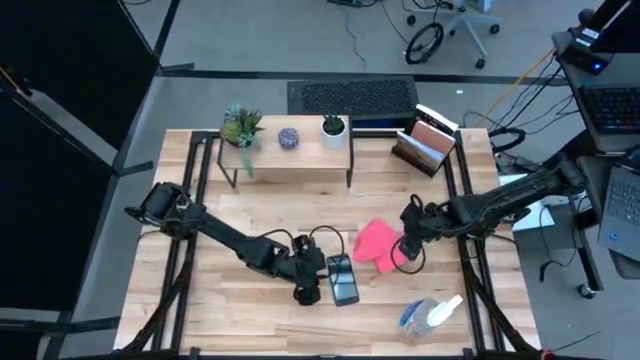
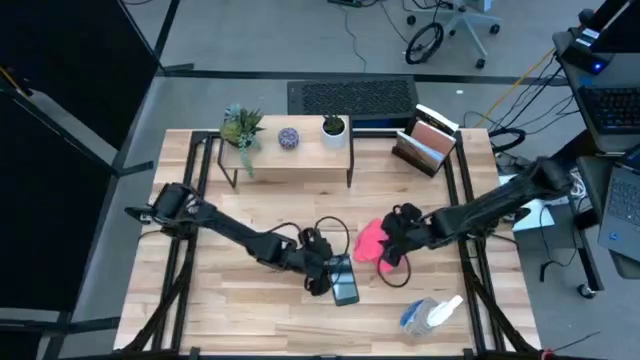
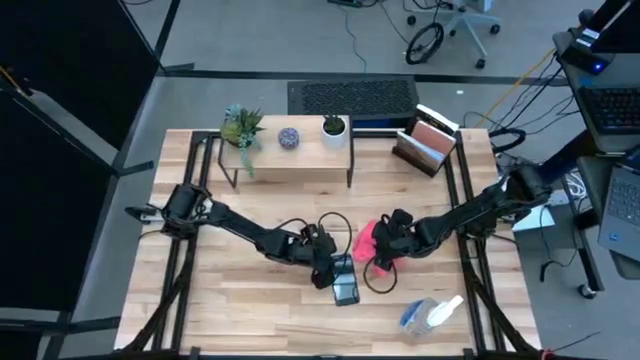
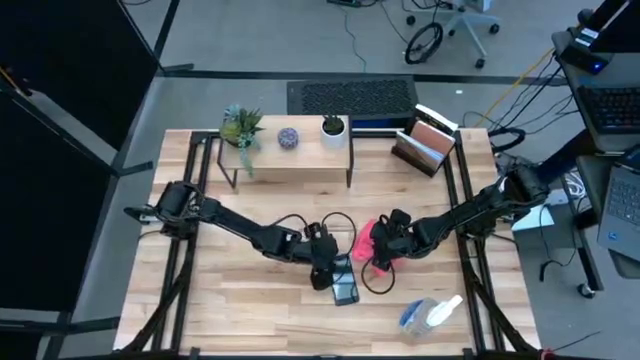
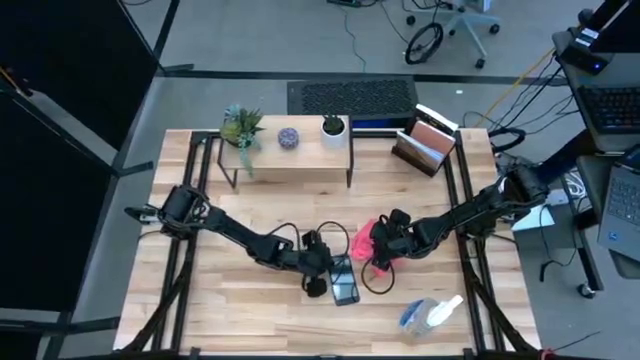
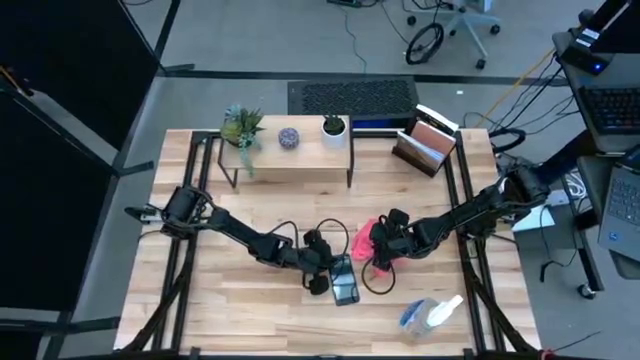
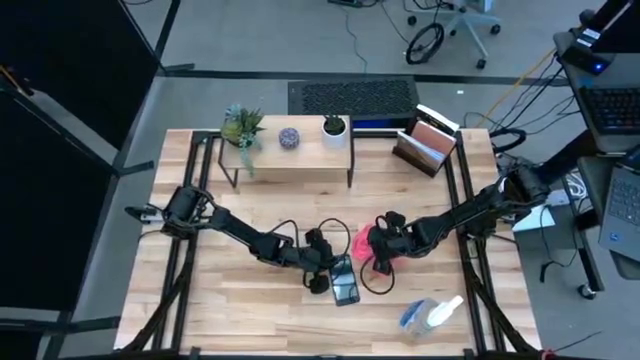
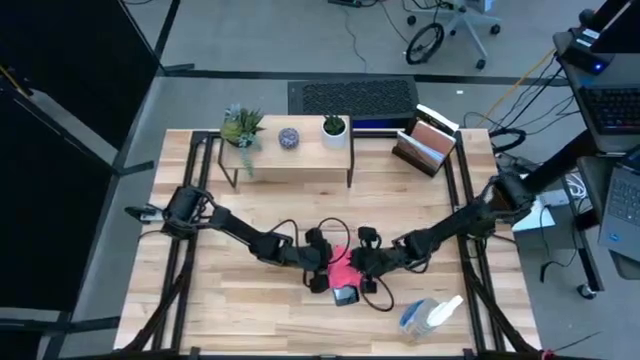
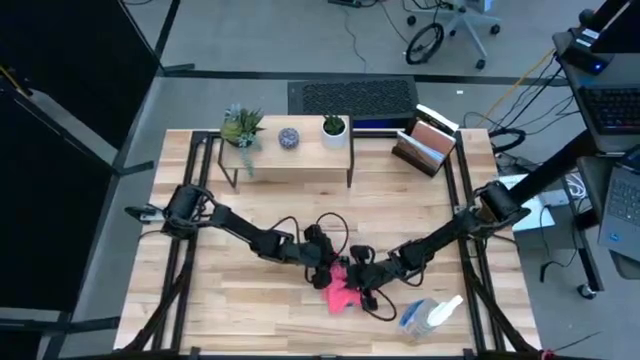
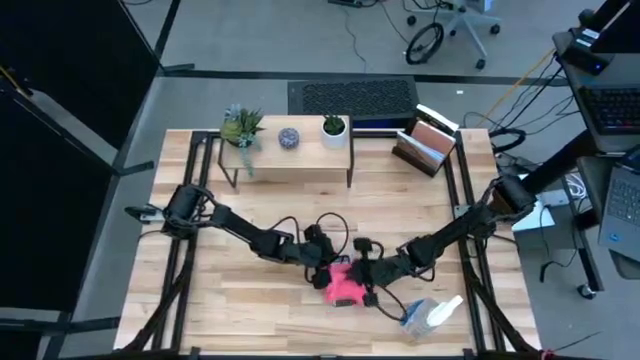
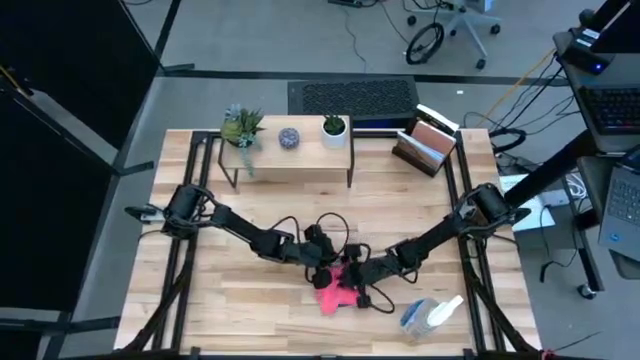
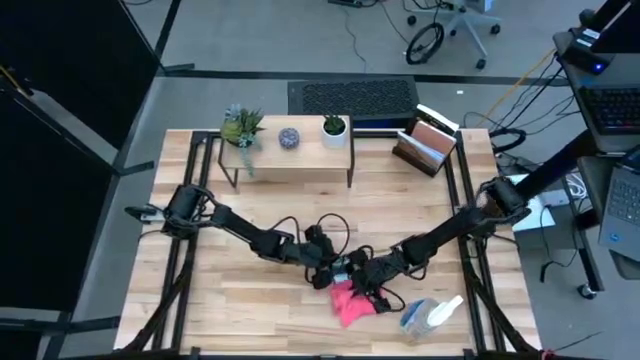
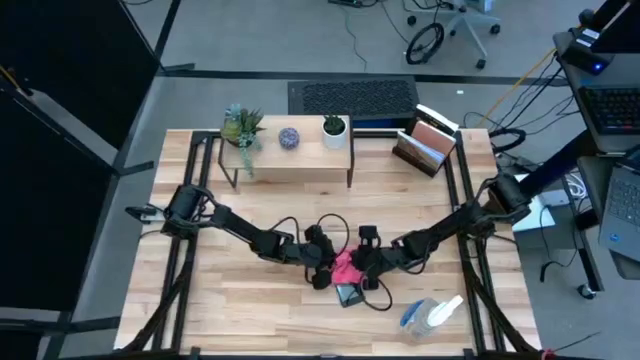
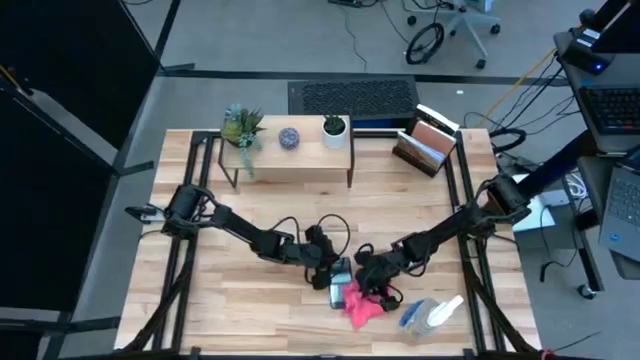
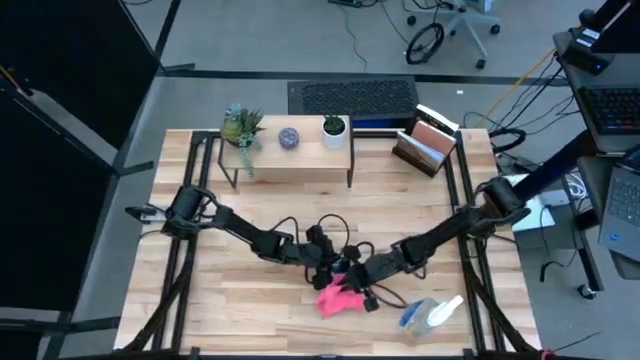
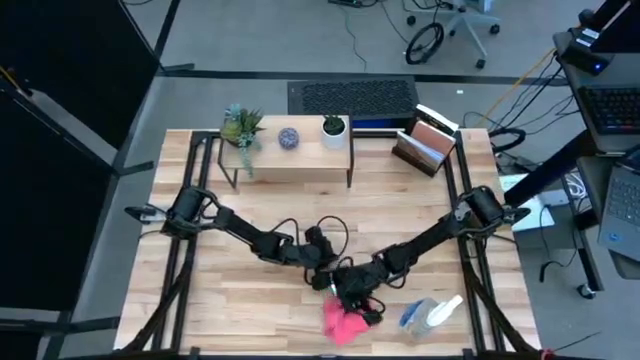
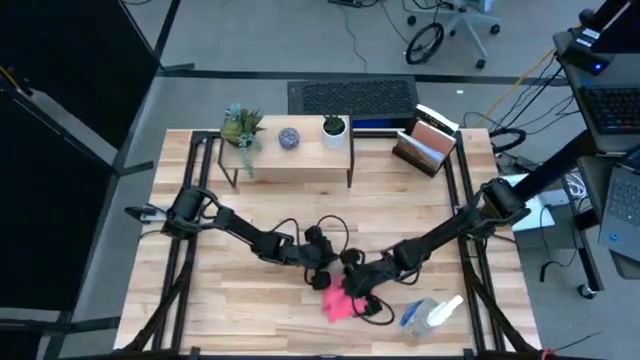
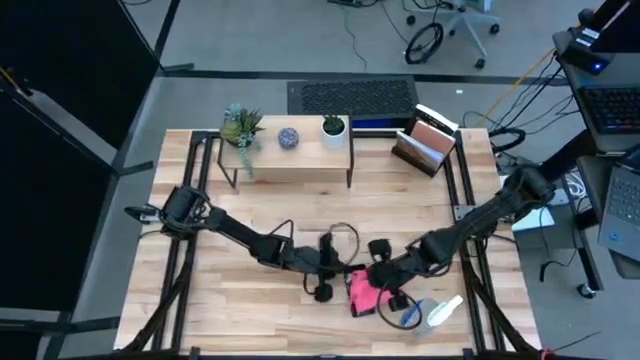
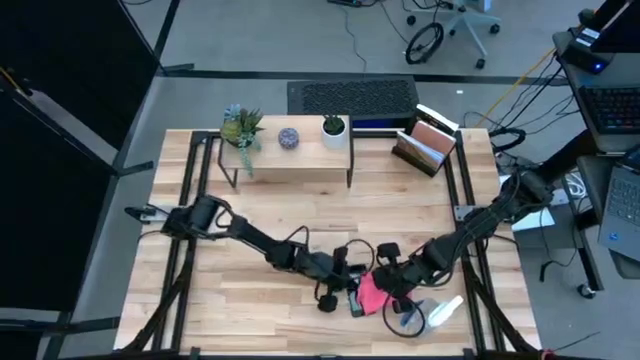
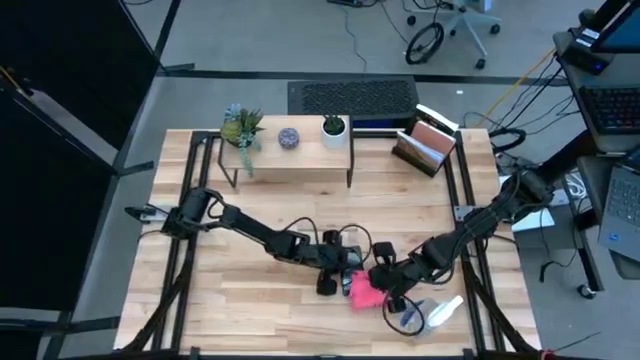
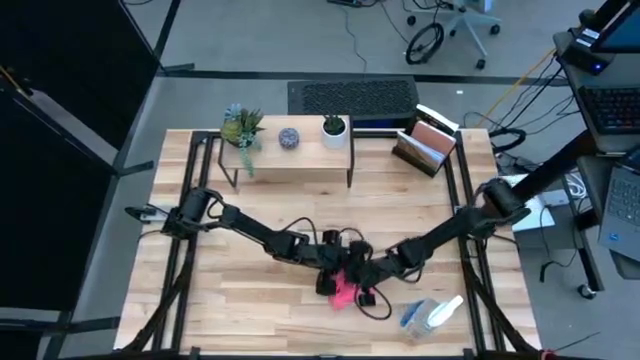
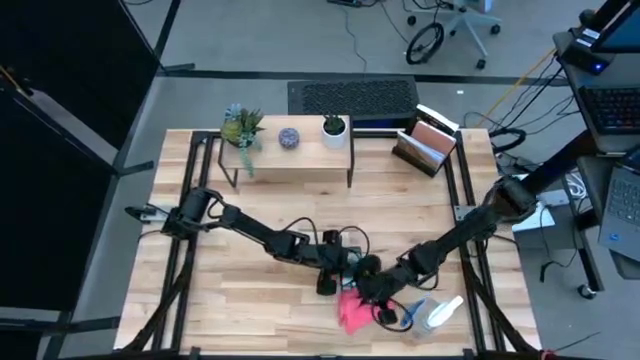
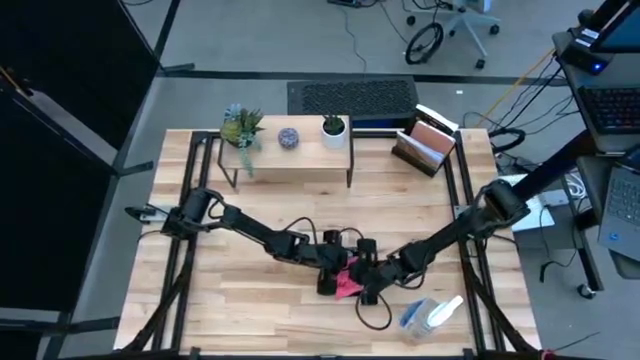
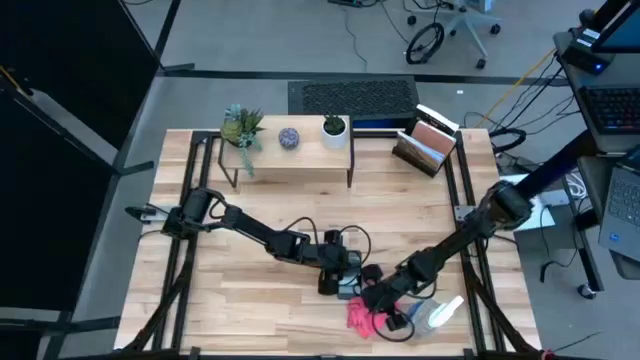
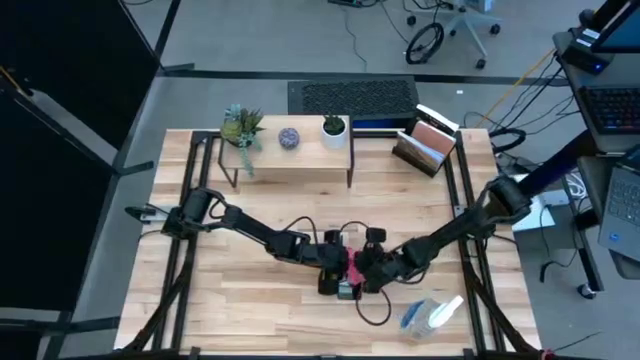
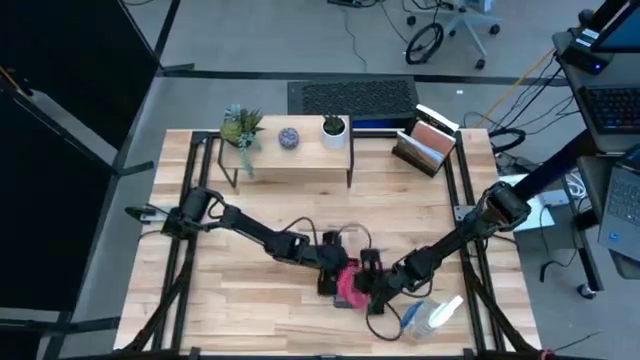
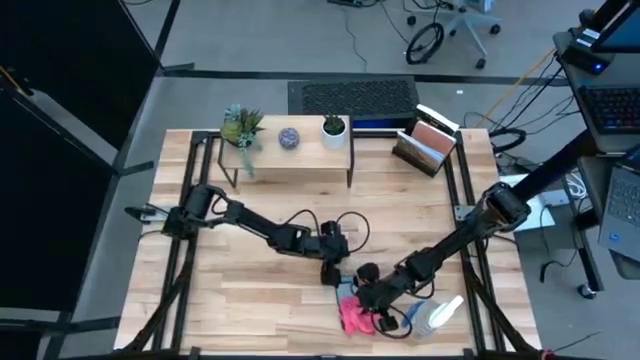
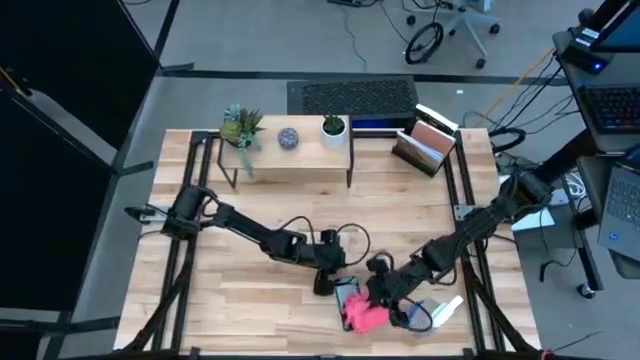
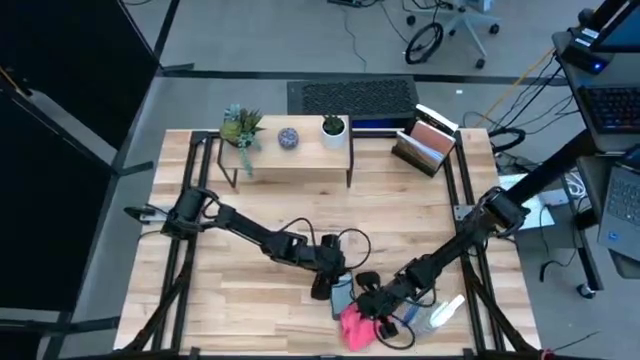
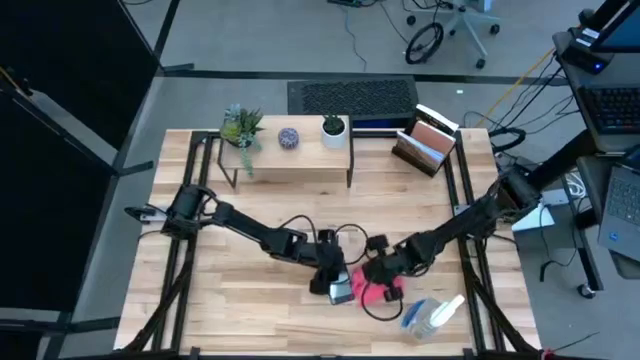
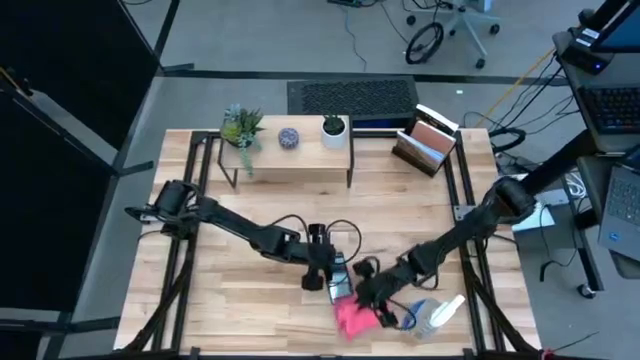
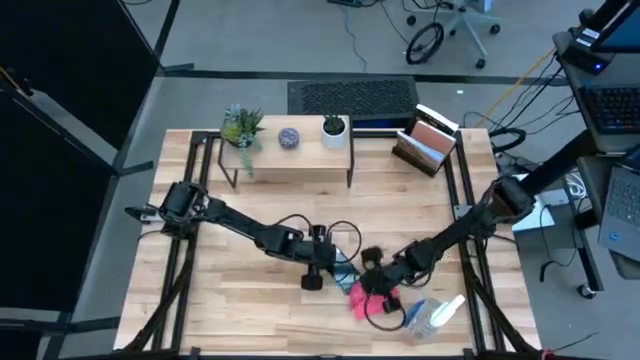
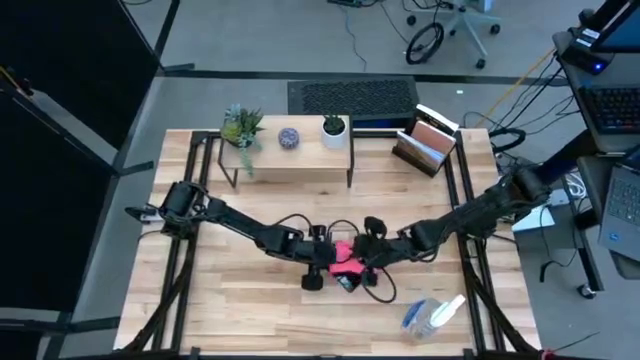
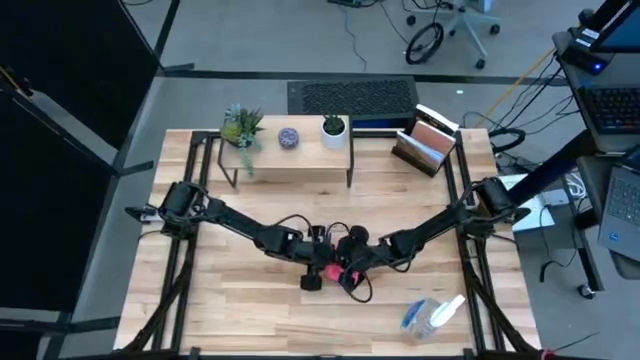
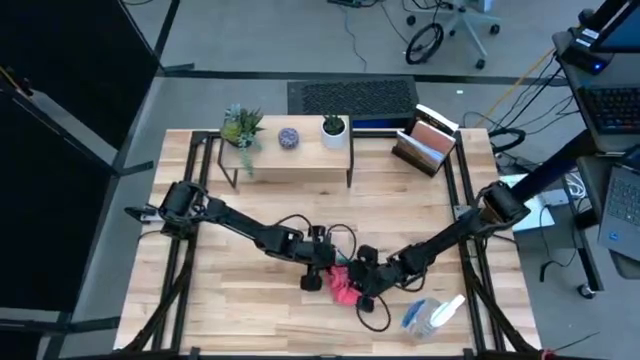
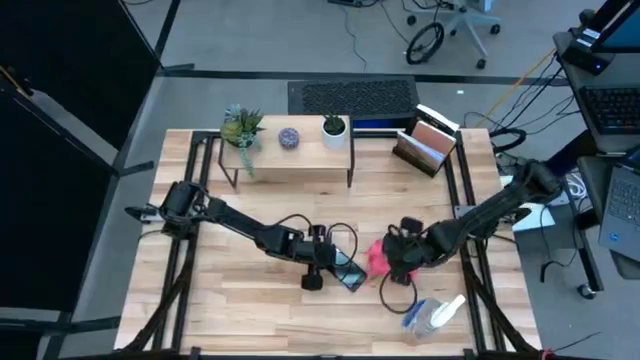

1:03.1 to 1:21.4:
Task: Apply microfiber cloth
Wipe the front of the cellphone using the pink microfiber cloth

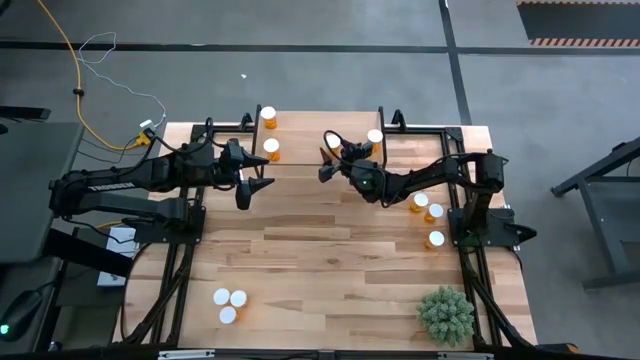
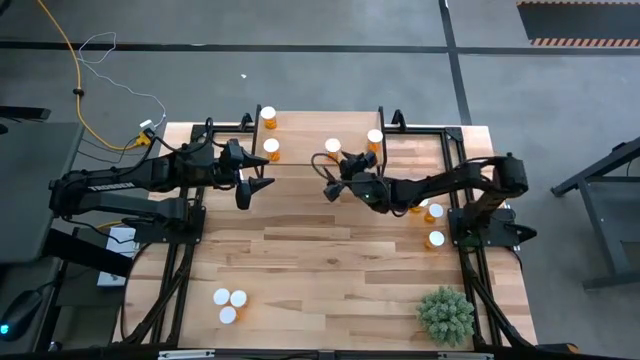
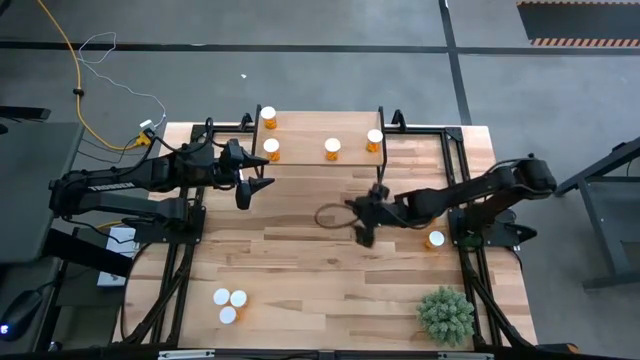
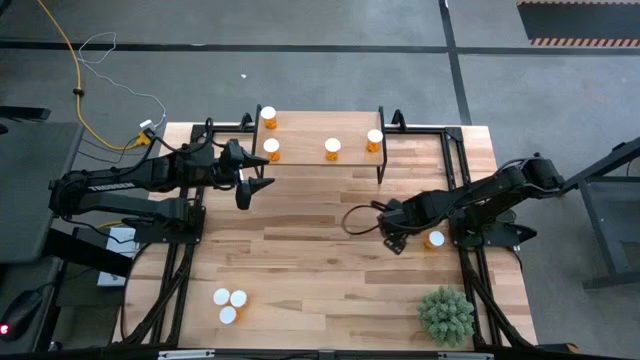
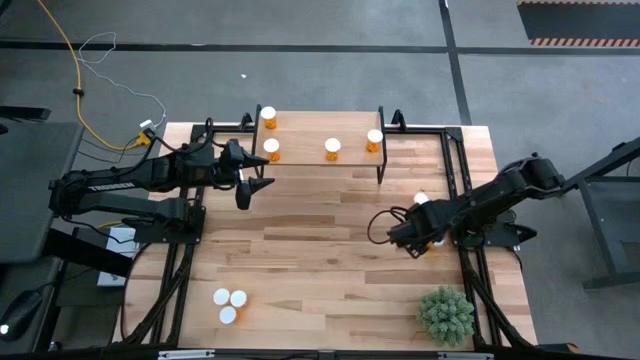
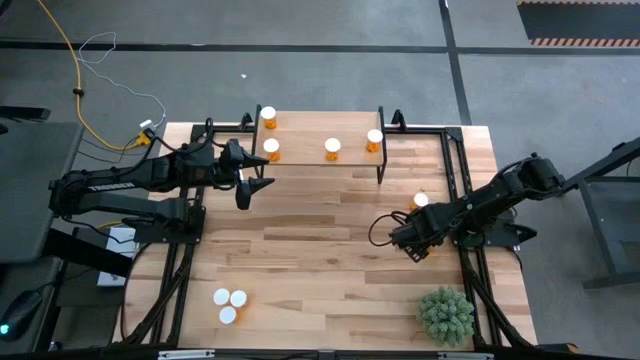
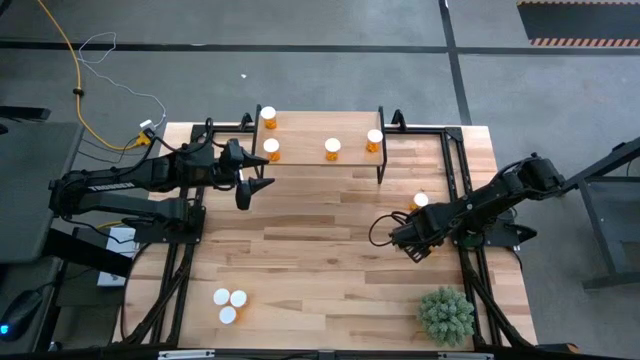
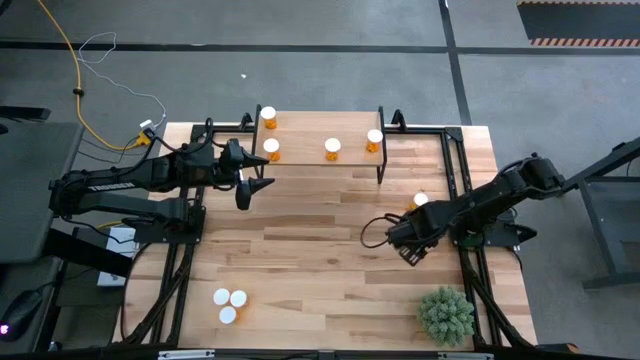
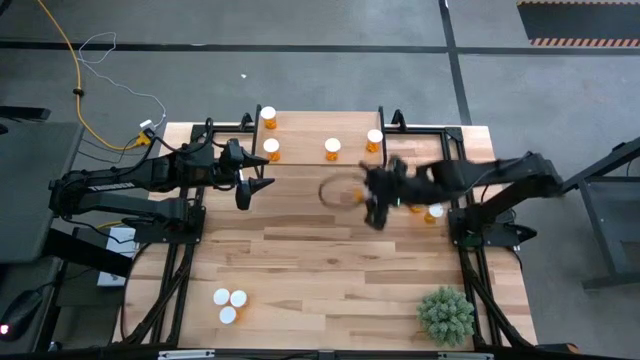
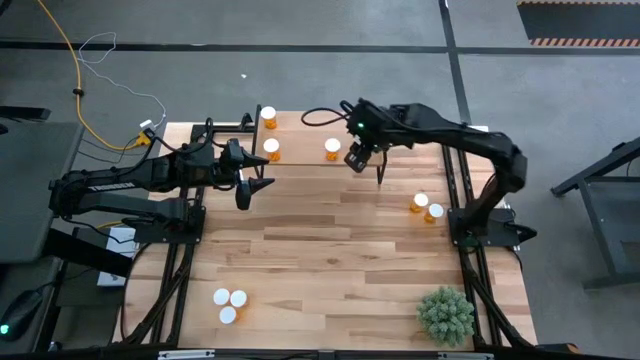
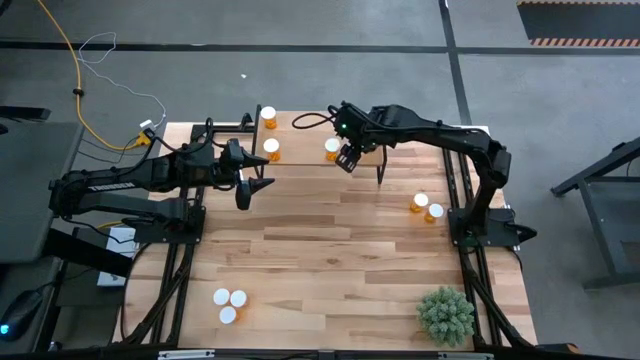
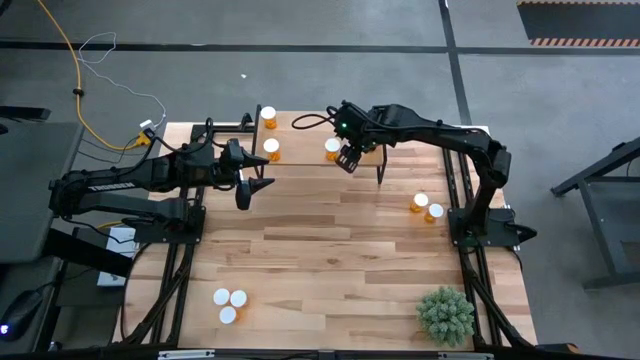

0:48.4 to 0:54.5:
Task: Pick and place medicine bottles onto shelf by color
Put the orange pill bottle on the shelf
